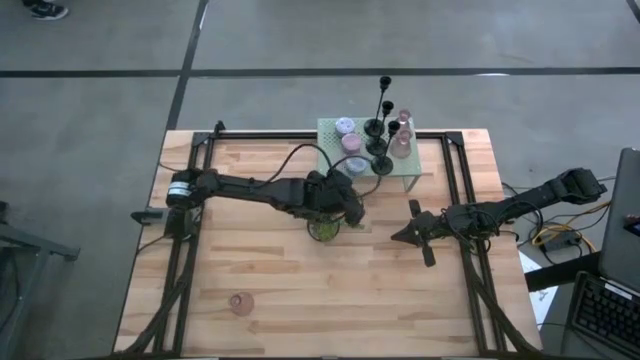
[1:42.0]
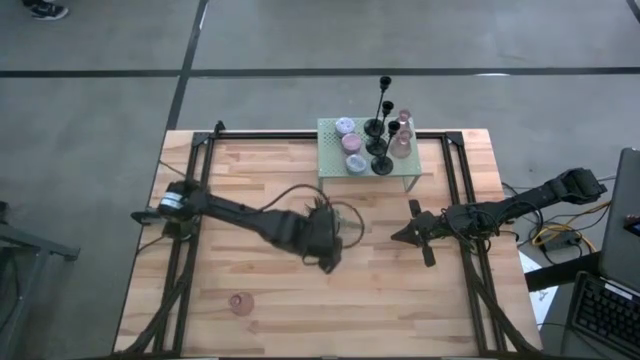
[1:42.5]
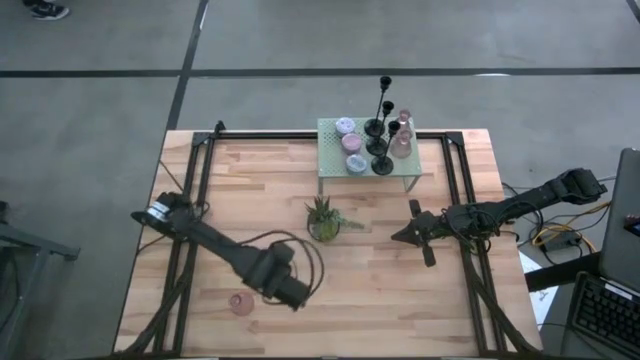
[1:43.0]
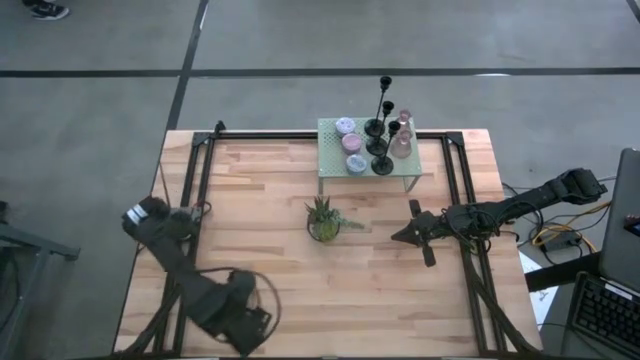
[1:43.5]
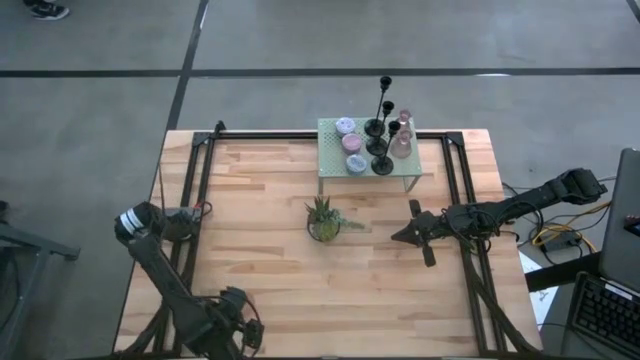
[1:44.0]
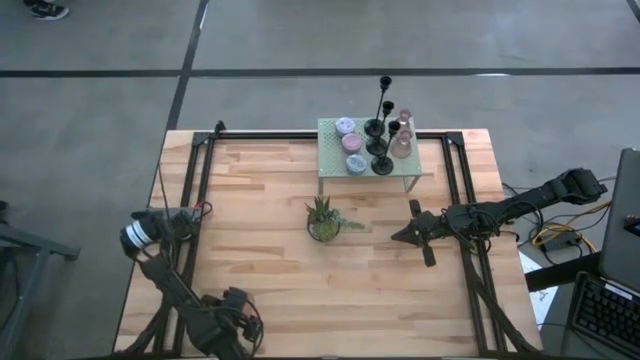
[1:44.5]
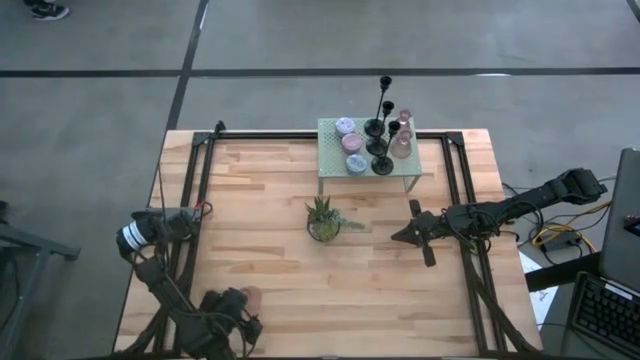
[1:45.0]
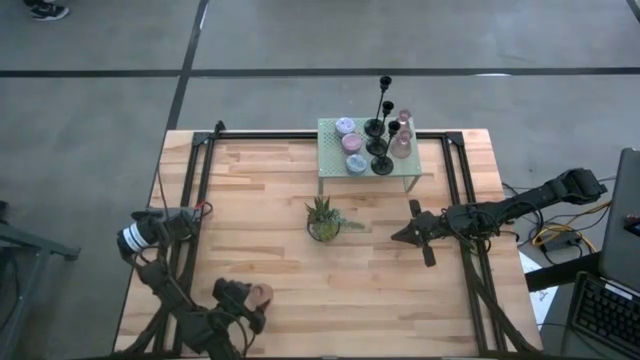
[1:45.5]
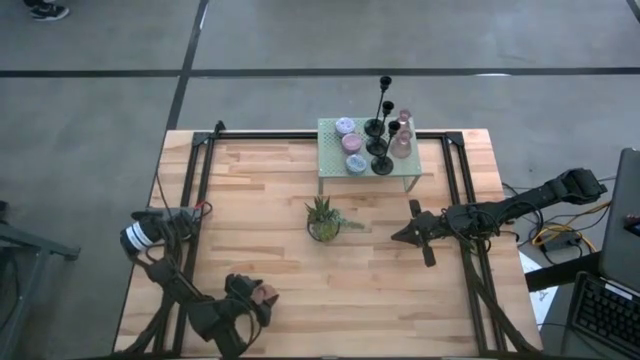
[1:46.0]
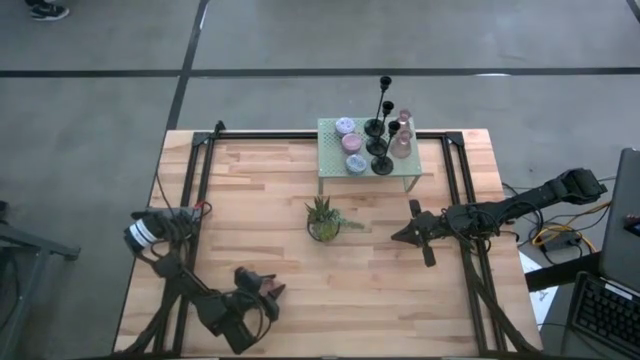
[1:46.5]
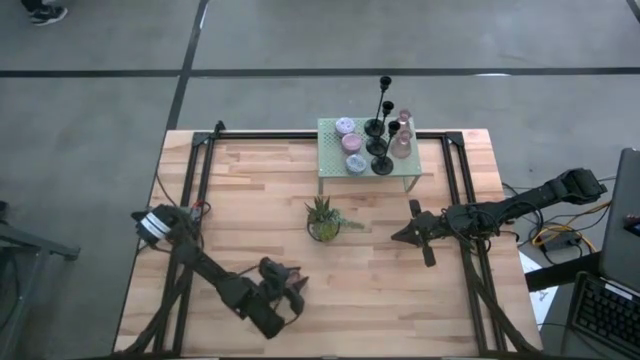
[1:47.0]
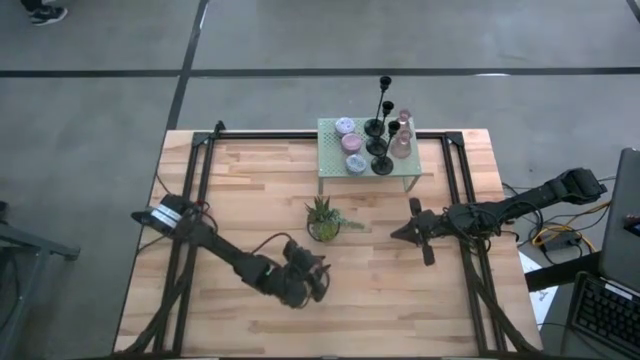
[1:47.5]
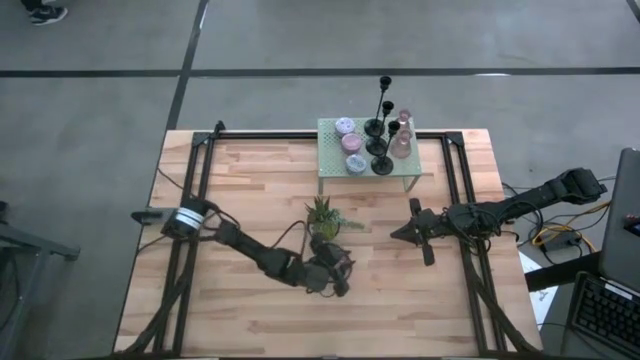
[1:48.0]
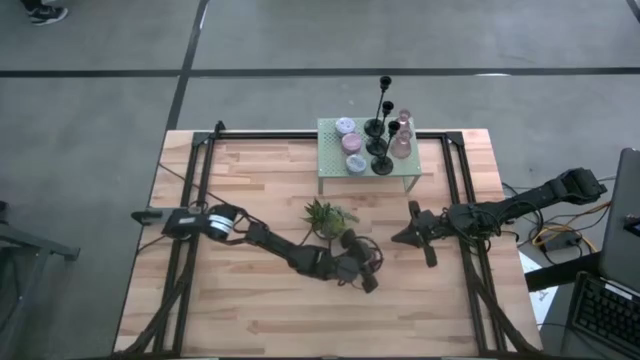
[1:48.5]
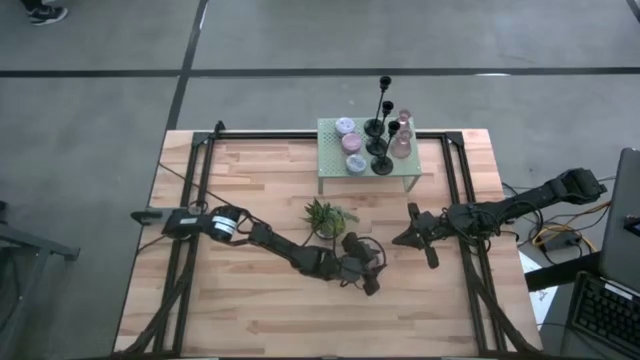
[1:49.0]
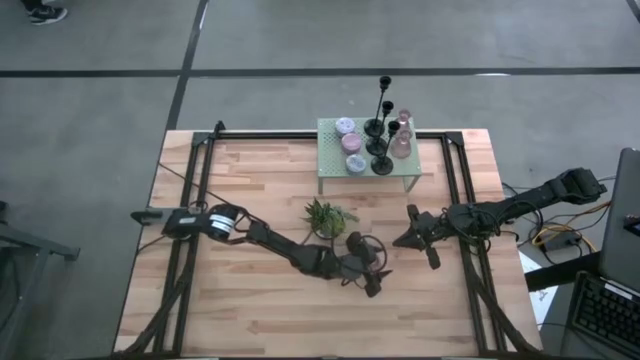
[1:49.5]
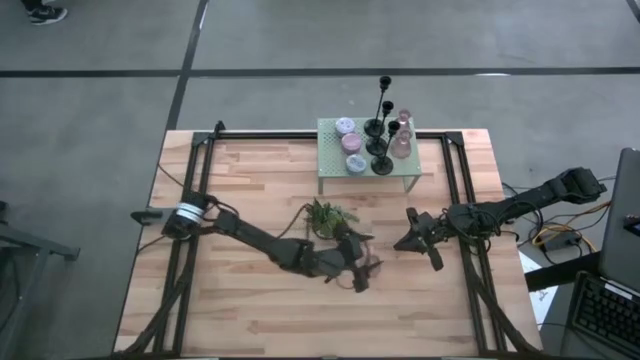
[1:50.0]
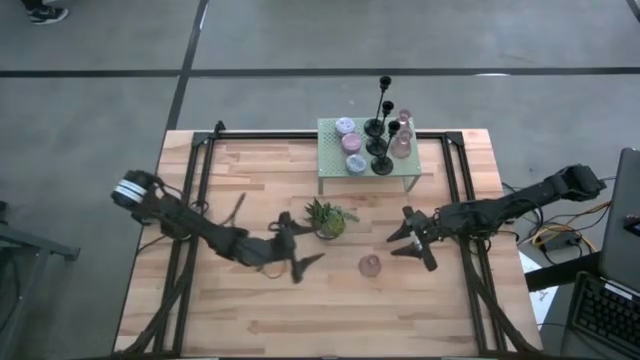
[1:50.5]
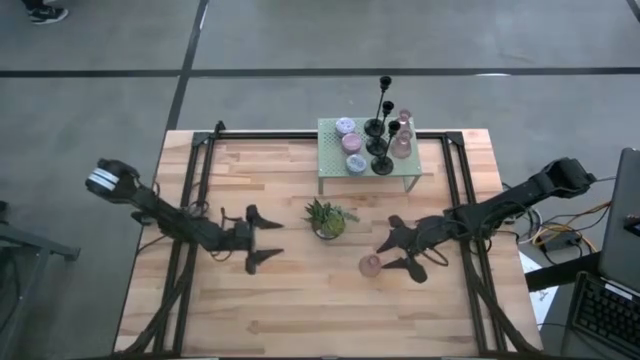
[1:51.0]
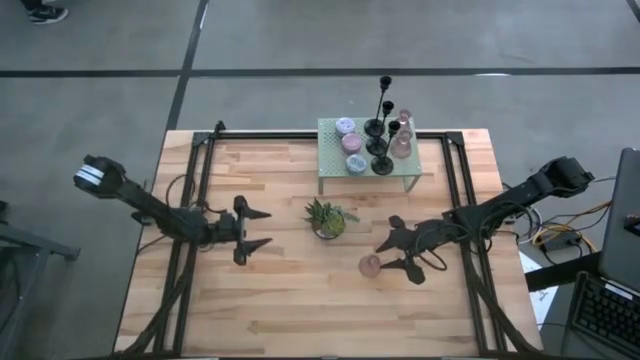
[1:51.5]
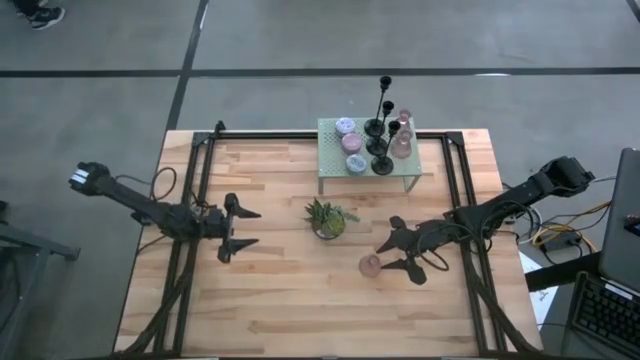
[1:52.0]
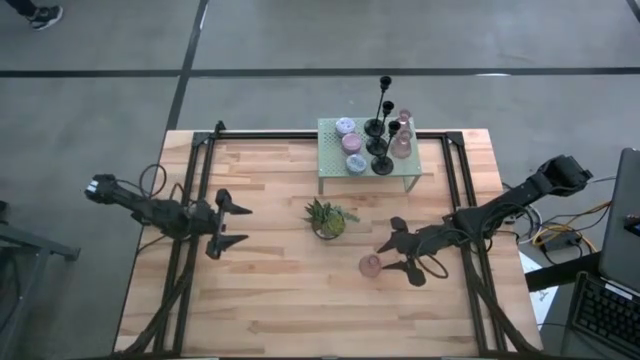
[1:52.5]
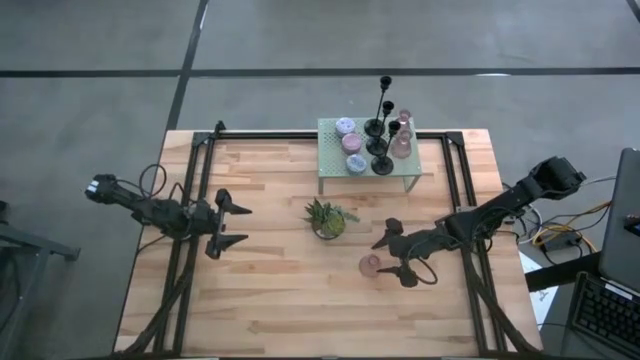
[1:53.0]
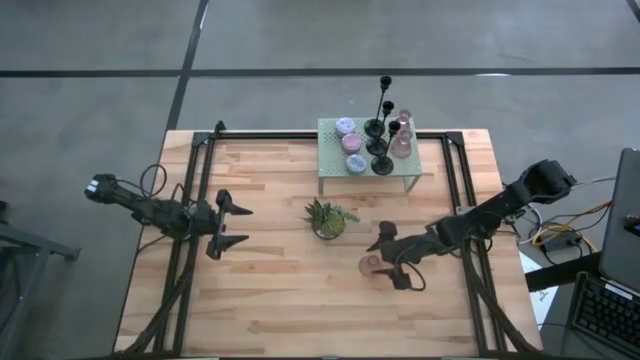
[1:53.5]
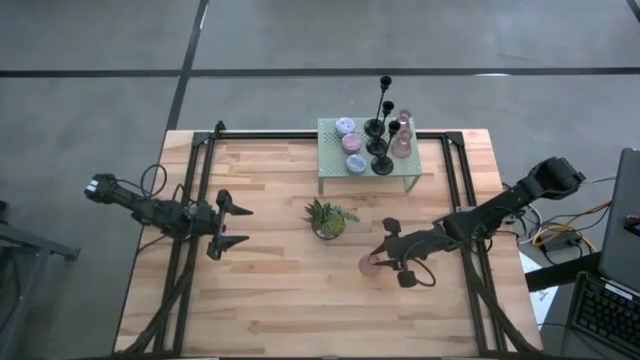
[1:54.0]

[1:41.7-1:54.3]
Task: Pick & Place candle stick holders
Put the glass candle holder on the shelf

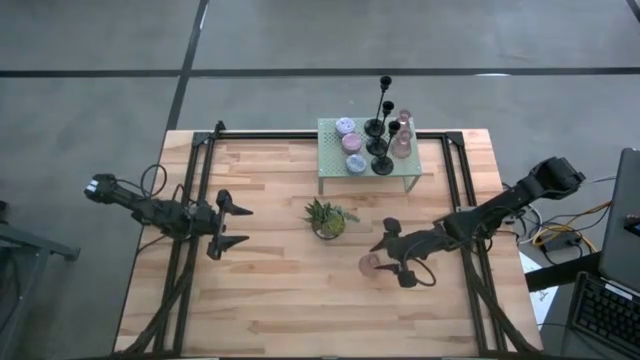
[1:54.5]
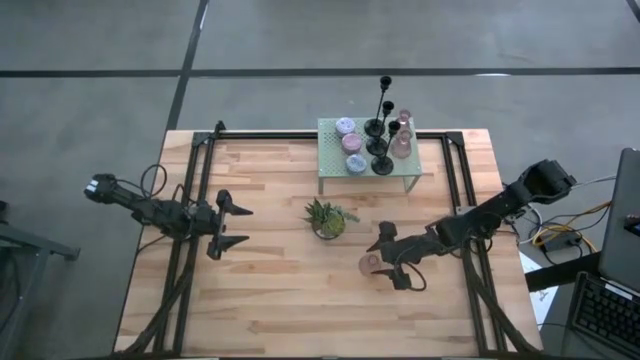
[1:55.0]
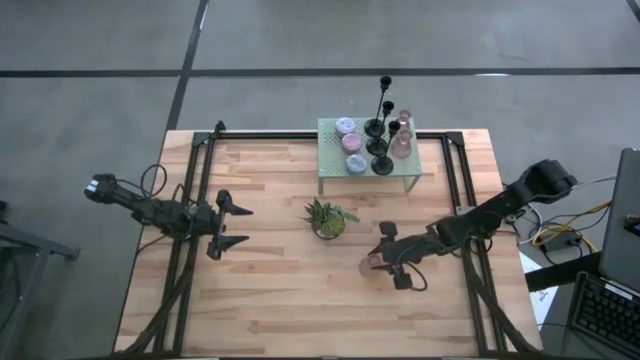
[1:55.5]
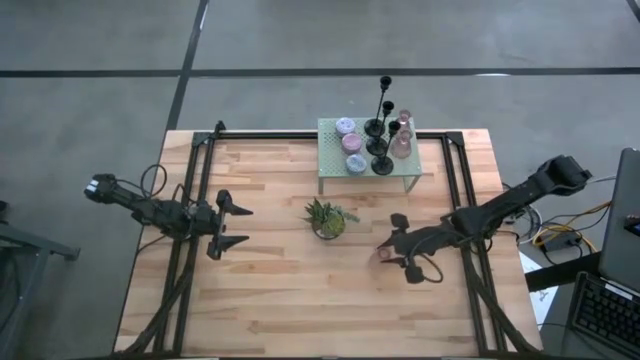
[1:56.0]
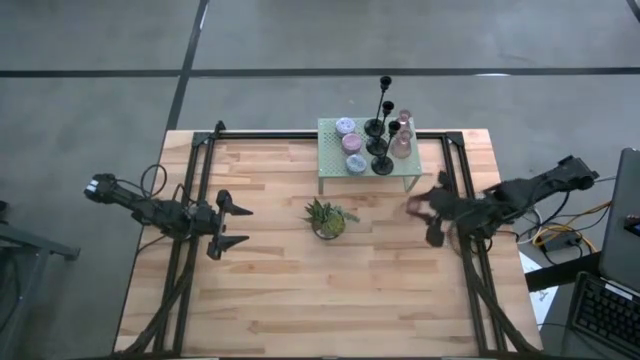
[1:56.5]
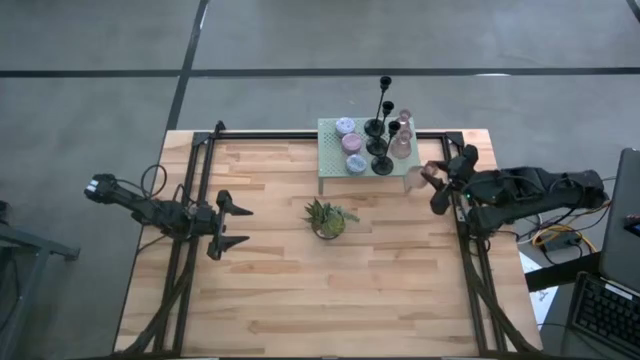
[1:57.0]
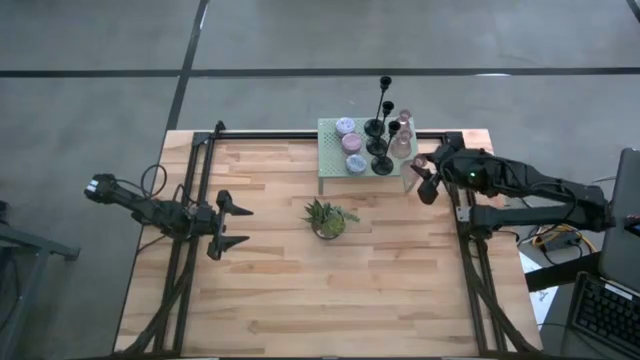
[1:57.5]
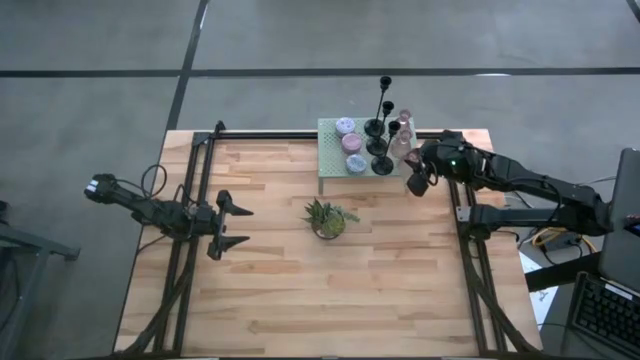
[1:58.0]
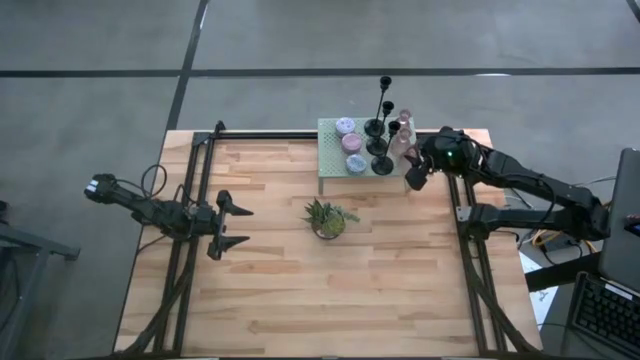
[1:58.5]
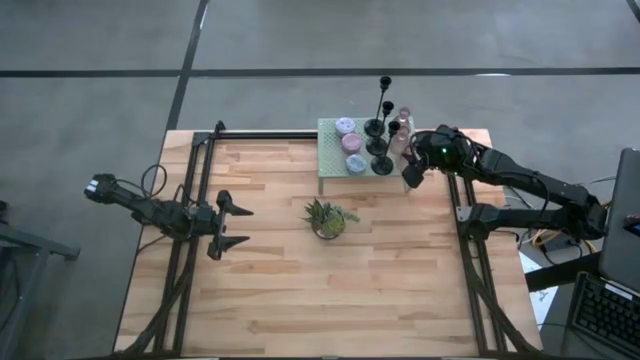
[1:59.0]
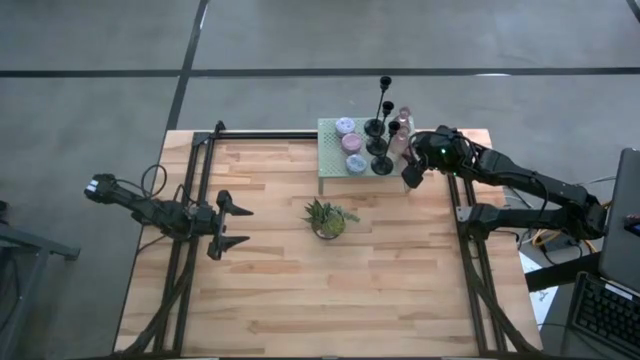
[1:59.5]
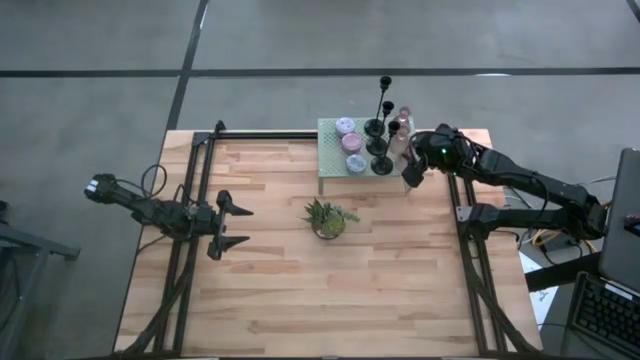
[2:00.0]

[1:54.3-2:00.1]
Put the glass candle holder on the shelf

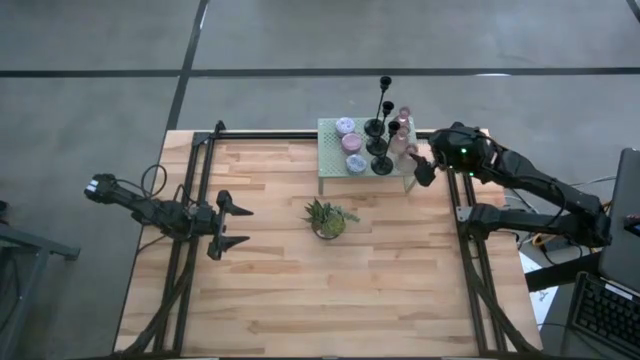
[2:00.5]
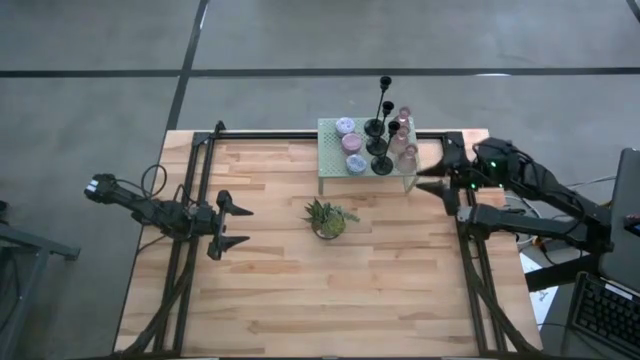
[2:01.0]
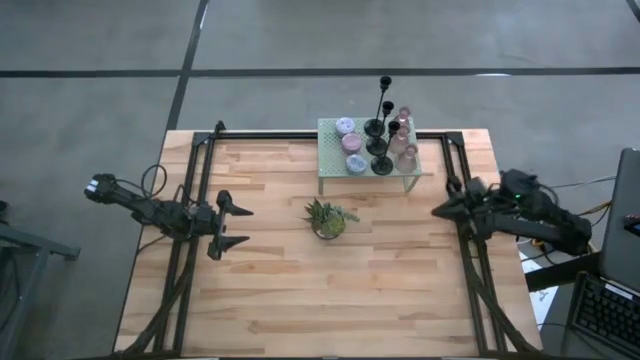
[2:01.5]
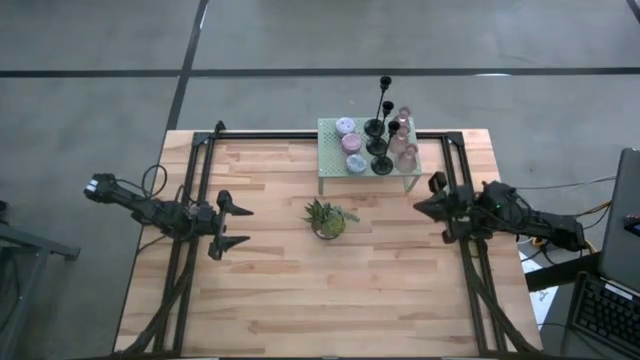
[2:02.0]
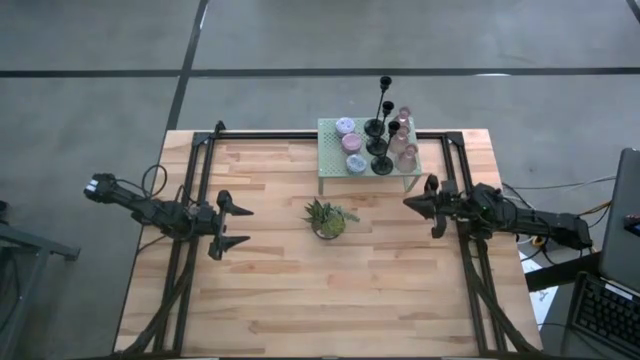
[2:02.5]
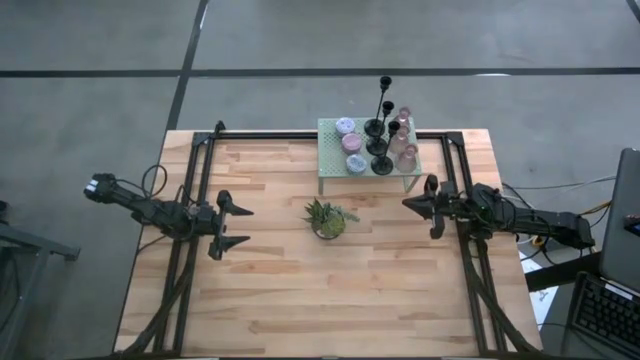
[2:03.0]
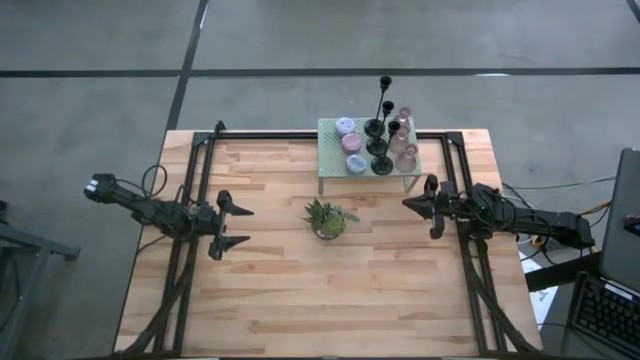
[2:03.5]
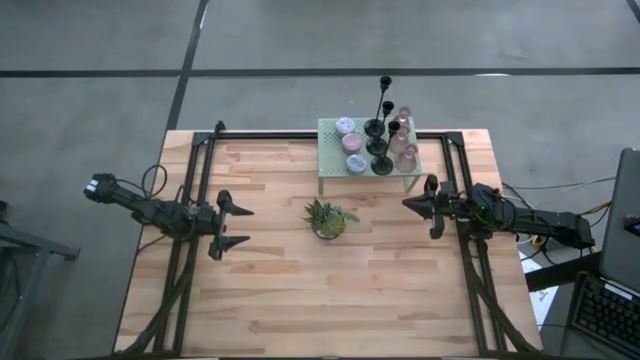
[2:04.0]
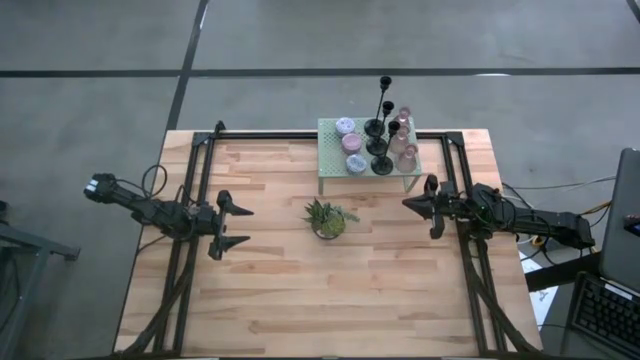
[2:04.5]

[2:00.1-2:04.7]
Return to Home Position
